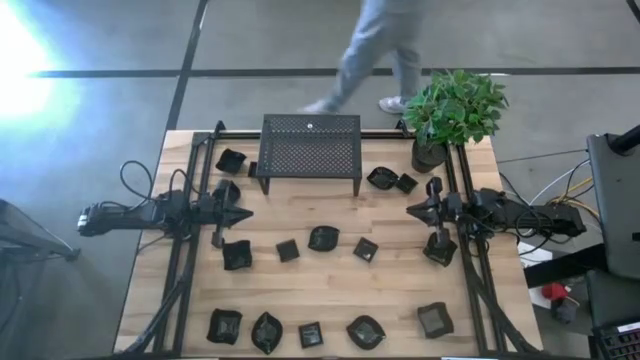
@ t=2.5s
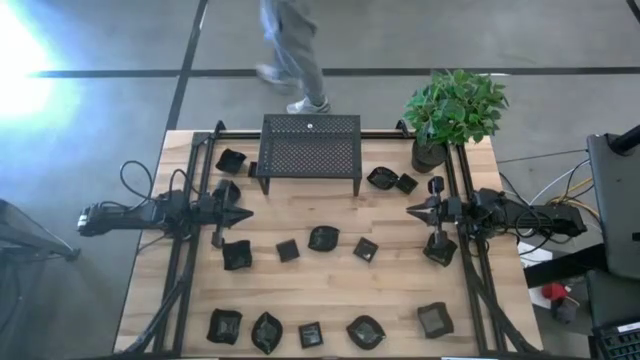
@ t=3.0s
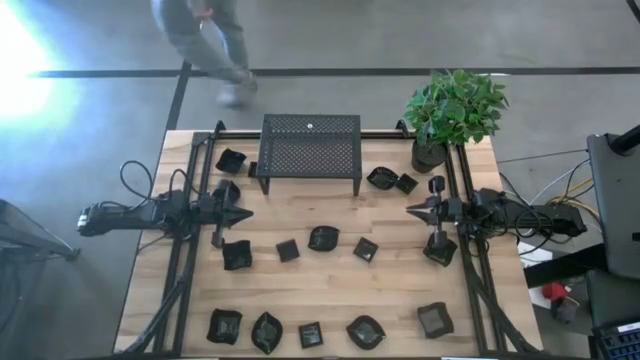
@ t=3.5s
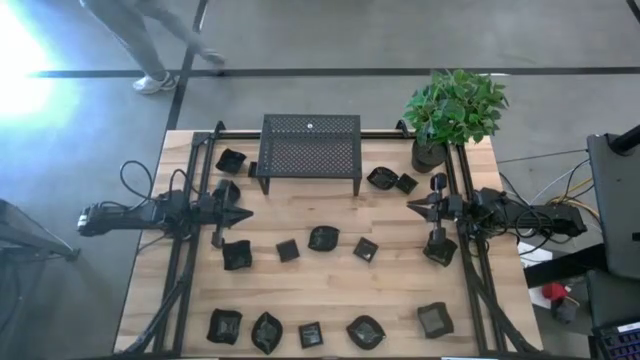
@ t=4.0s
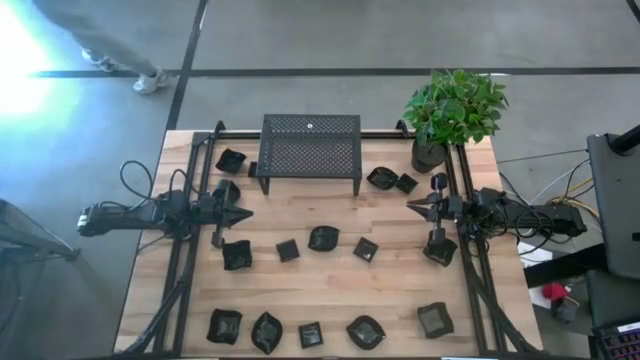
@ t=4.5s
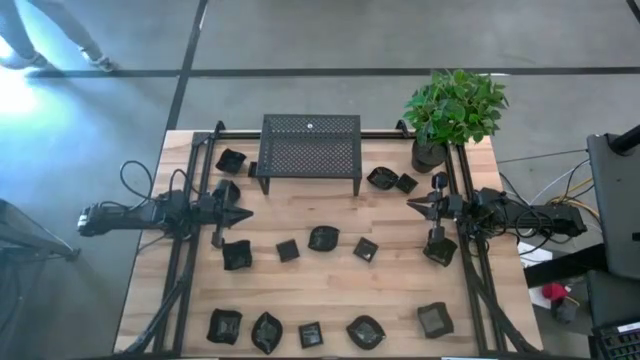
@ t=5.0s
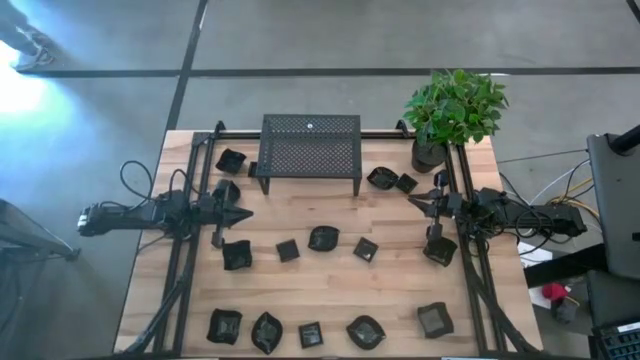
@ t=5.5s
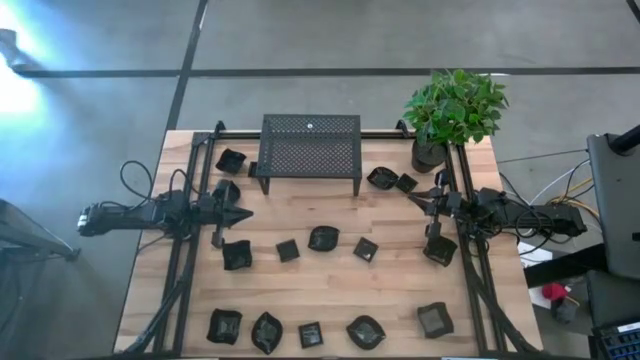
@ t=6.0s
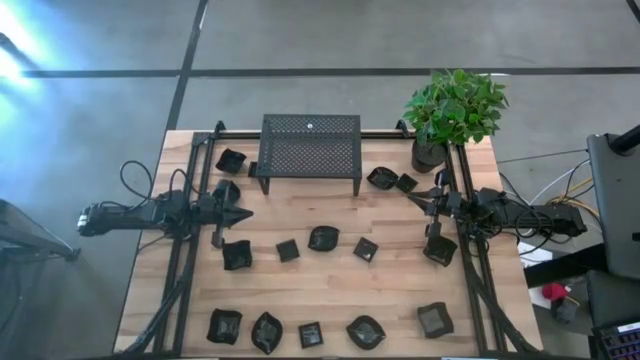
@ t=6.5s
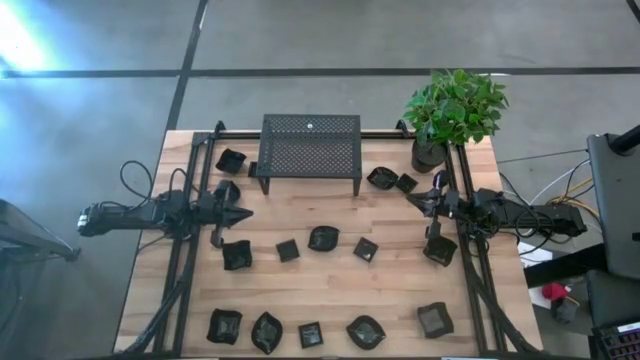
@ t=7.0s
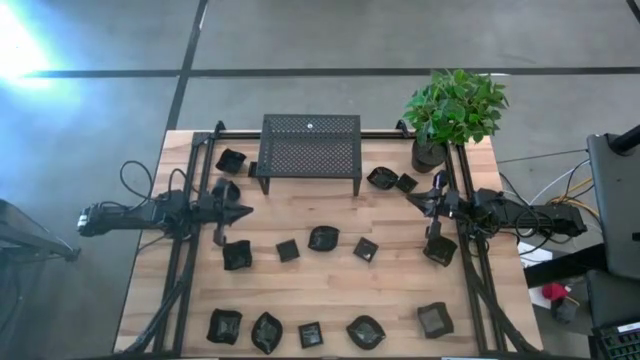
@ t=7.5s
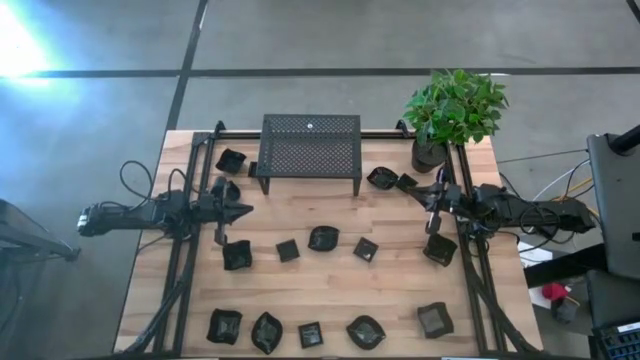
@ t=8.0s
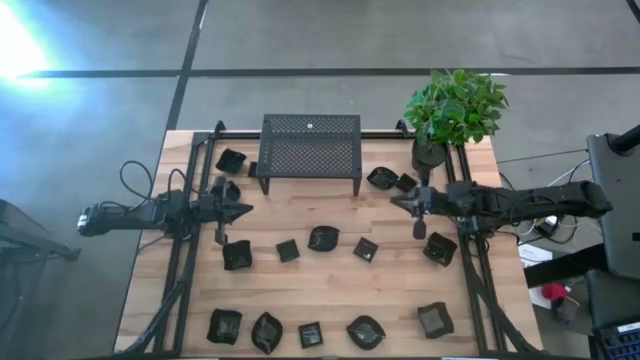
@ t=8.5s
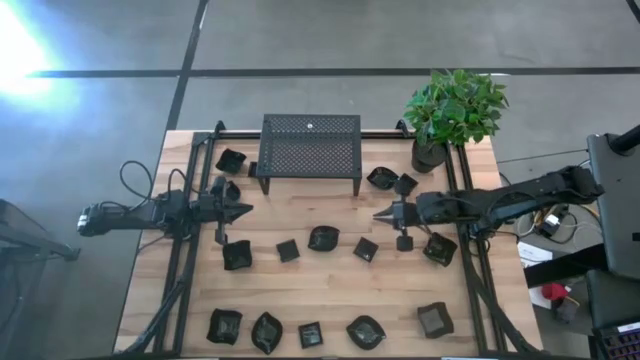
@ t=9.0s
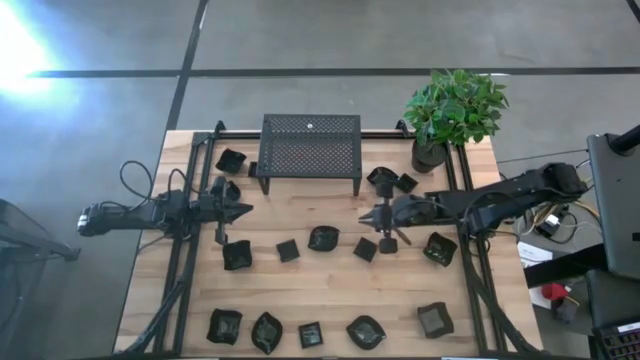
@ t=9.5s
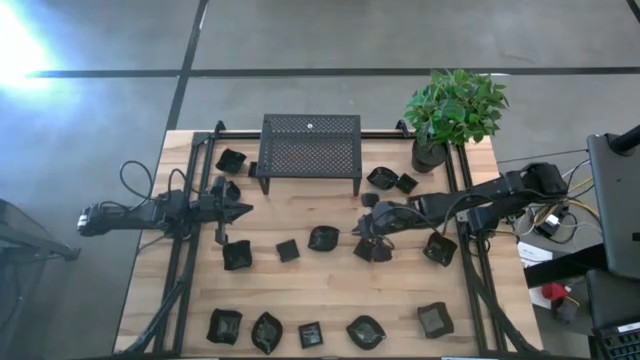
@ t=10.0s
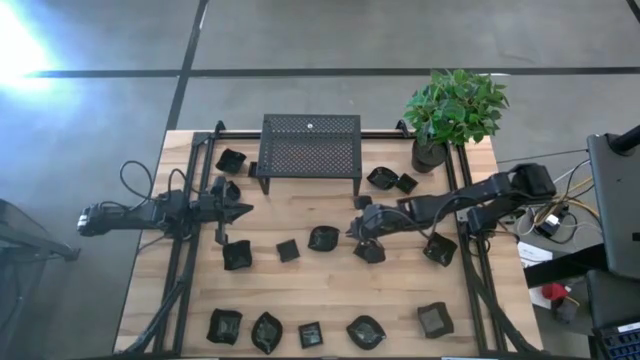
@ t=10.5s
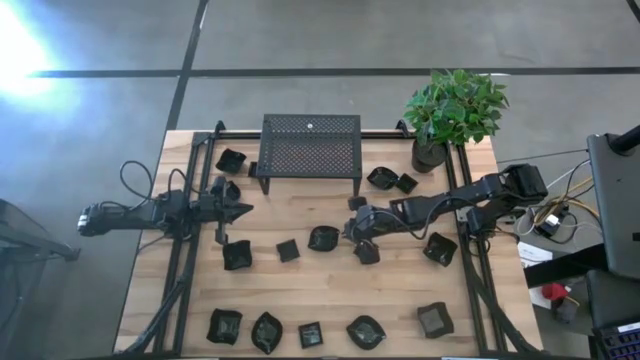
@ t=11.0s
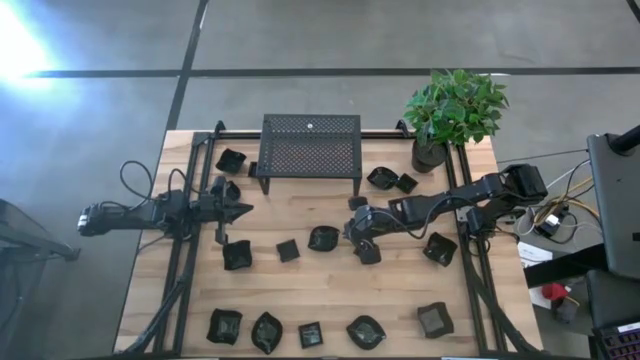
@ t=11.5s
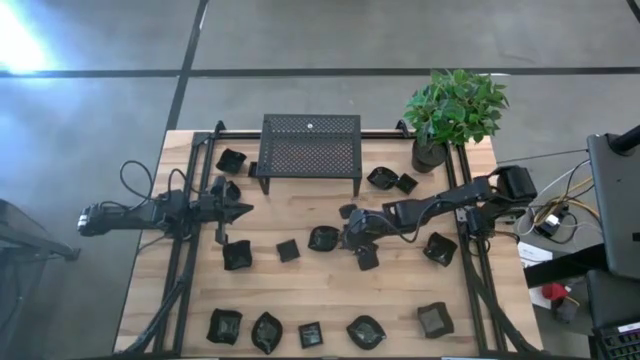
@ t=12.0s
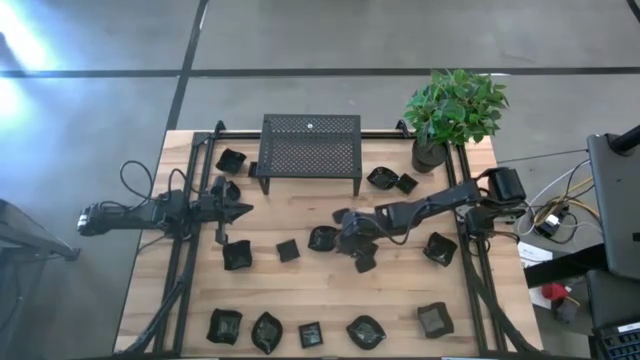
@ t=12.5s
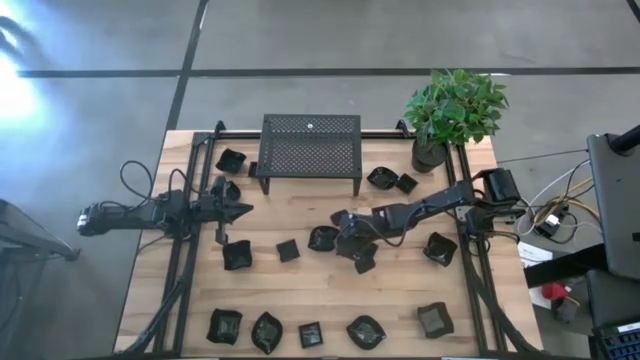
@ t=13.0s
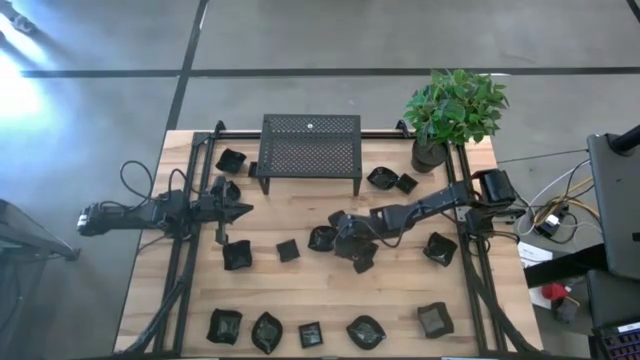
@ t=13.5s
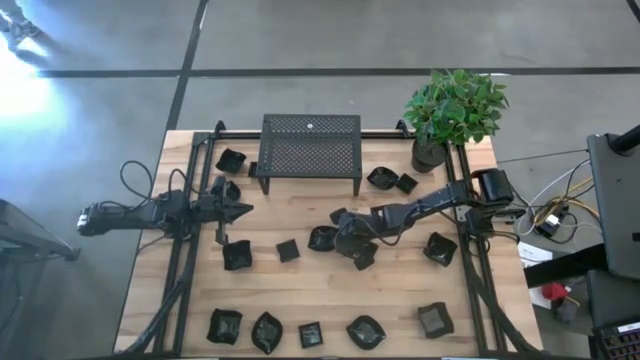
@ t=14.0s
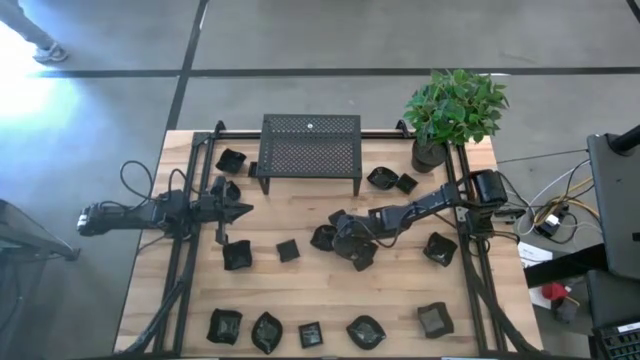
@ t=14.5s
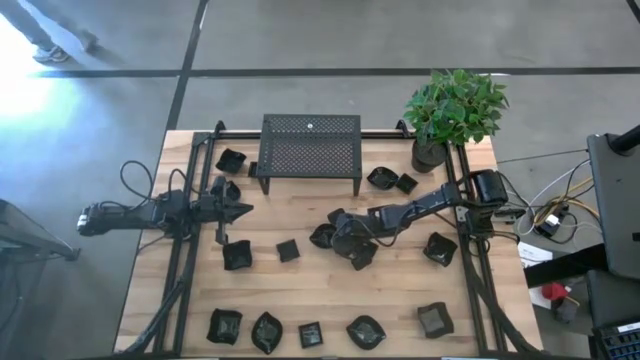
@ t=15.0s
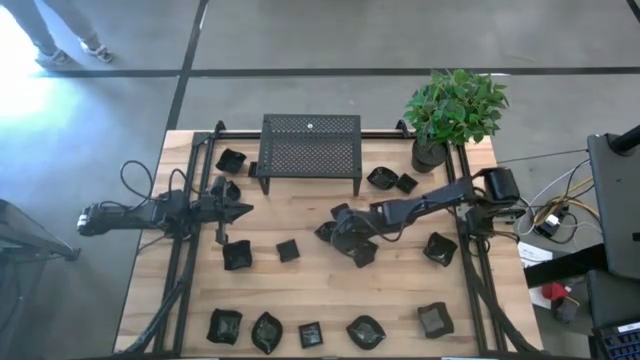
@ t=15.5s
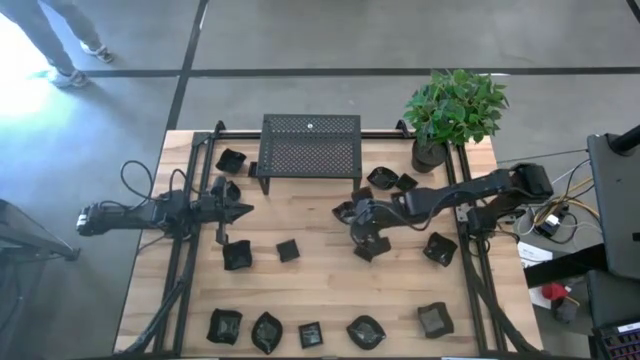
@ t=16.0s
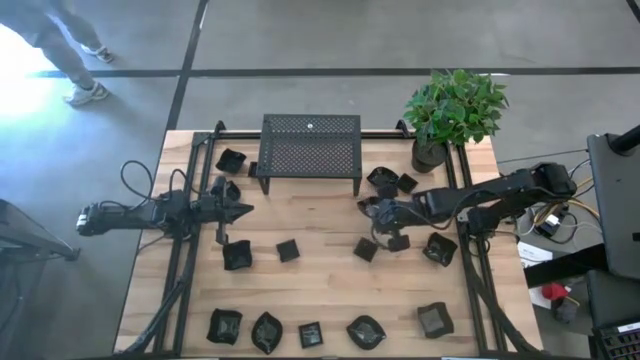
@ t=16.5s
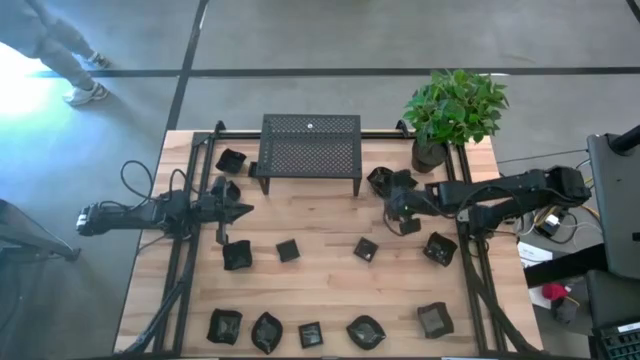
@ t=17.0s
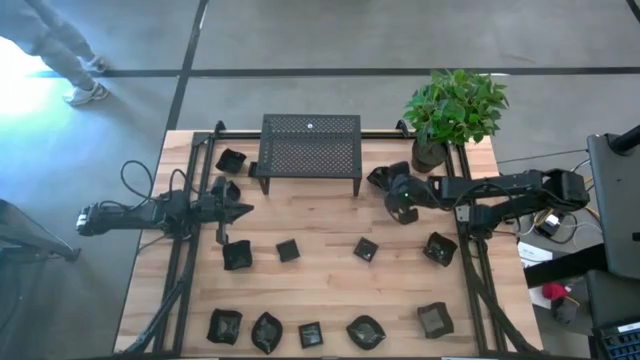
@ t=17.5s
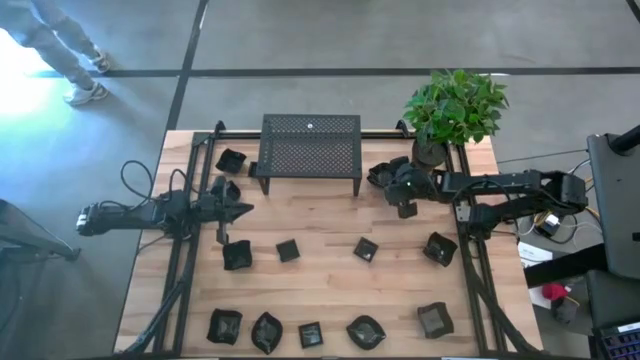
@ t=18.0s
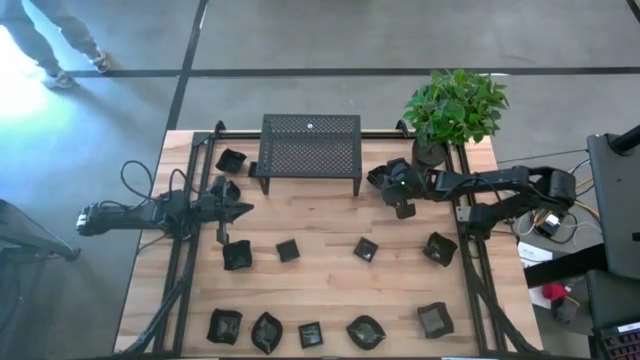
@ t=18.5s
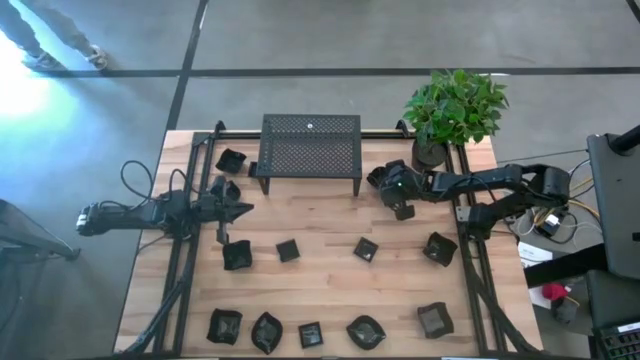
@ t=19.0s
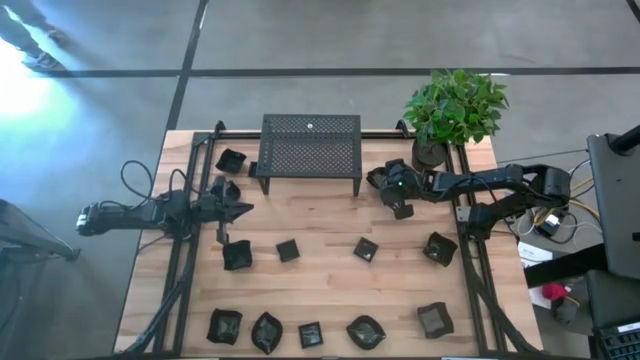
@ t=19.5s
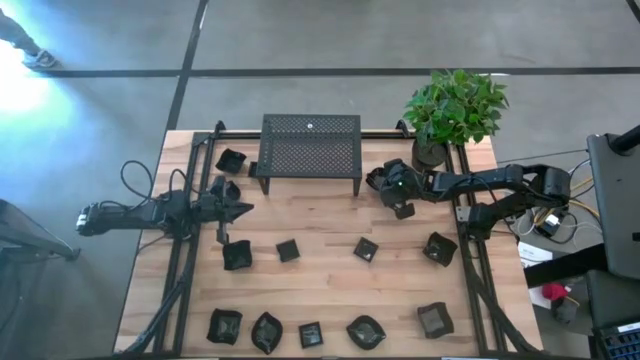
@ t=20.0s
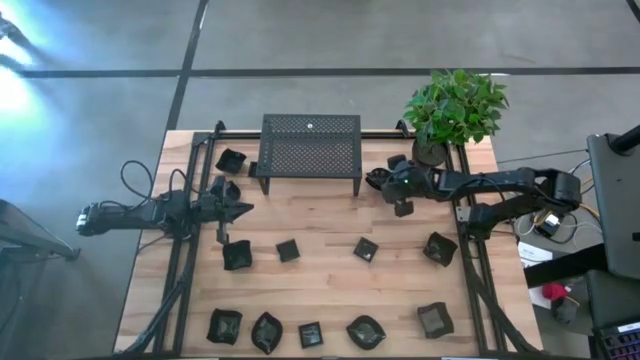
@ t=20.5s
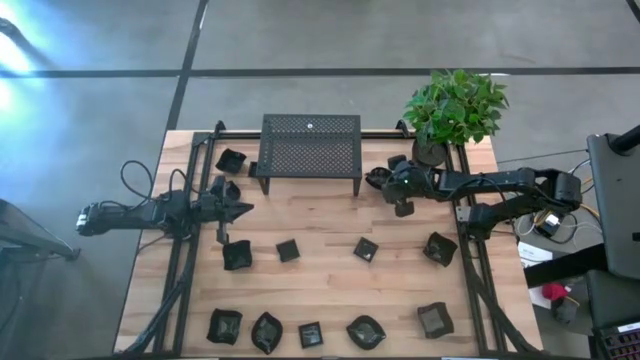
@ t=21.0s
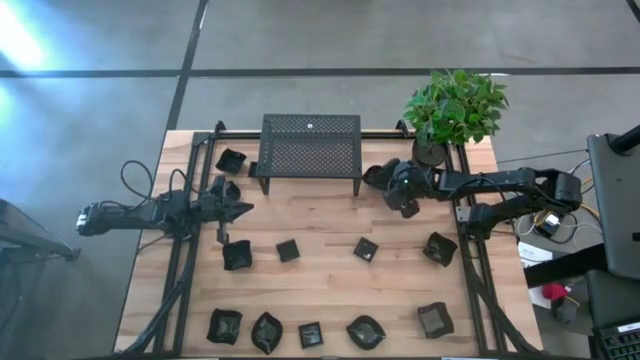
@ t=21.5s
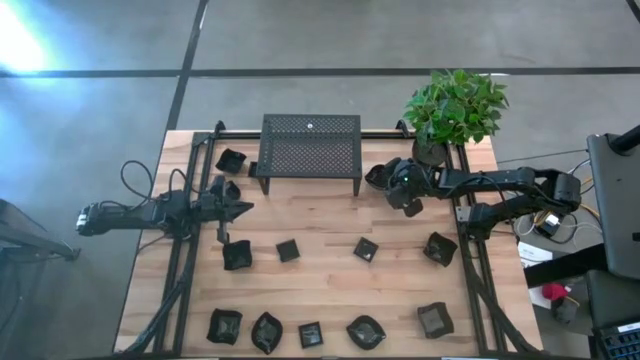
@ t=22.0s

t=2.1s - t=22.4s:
Task: Pick & Place Mini shaped plates
Stack the black leaf shaped plate on top of the other black leaf shaped plate
